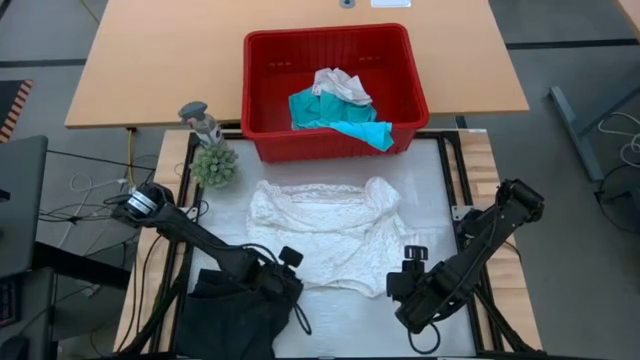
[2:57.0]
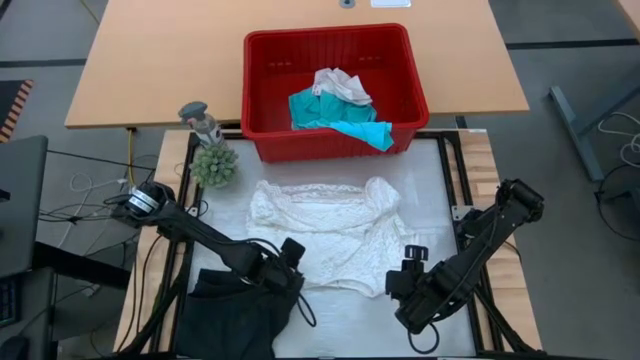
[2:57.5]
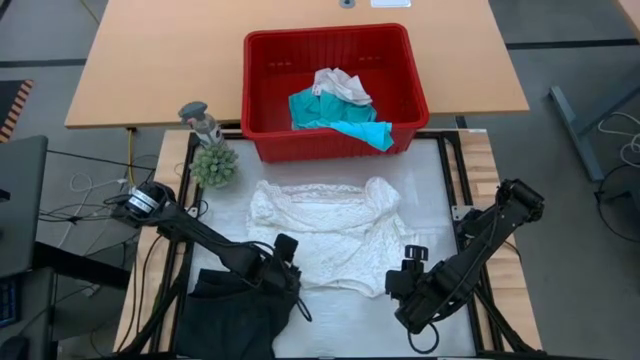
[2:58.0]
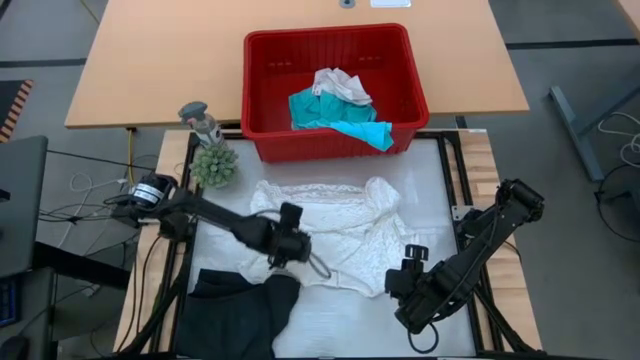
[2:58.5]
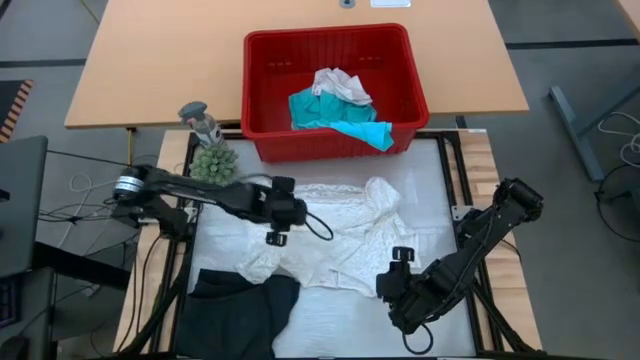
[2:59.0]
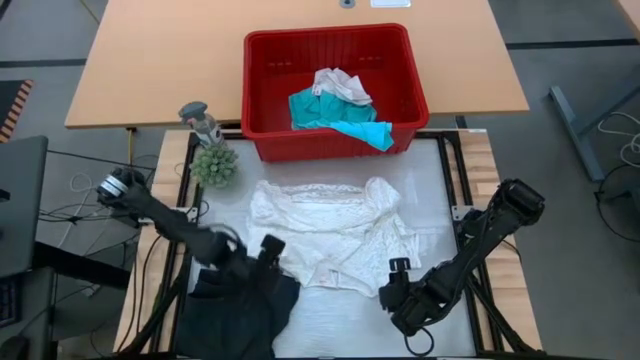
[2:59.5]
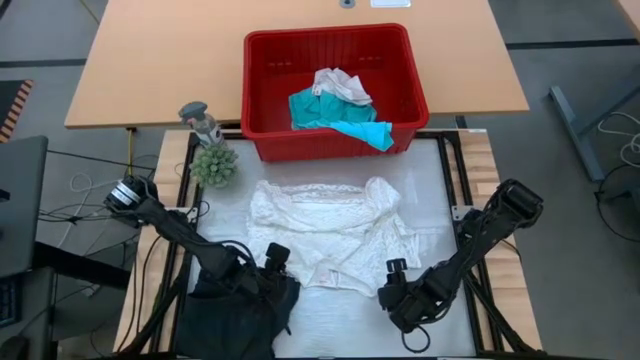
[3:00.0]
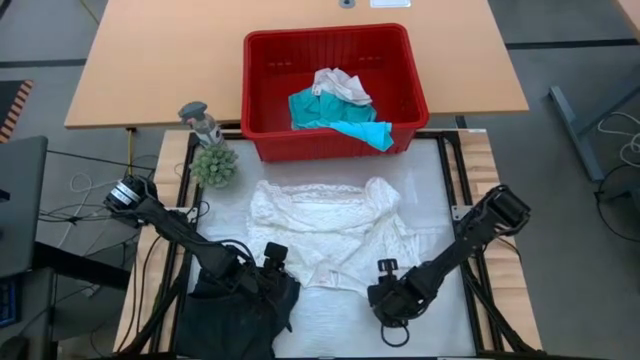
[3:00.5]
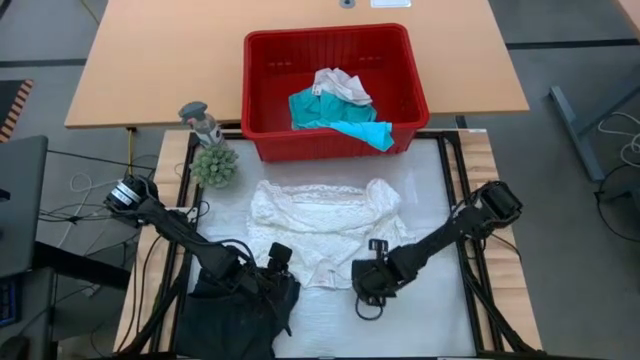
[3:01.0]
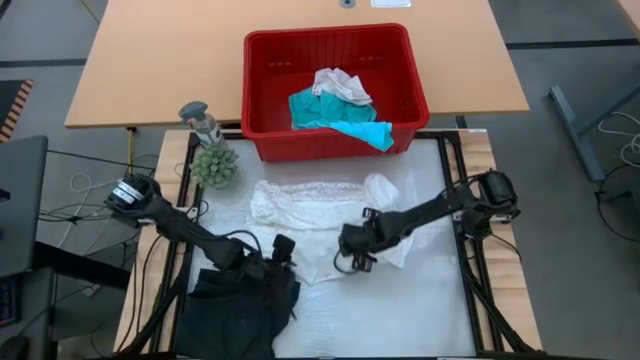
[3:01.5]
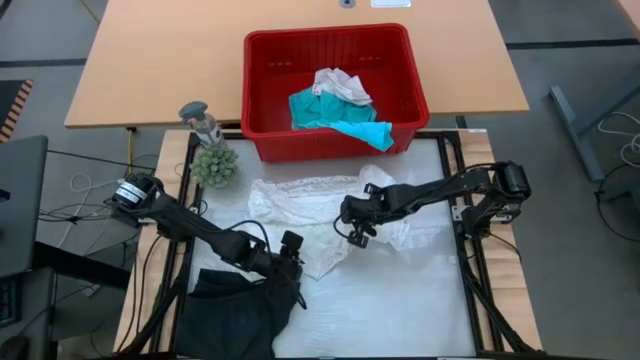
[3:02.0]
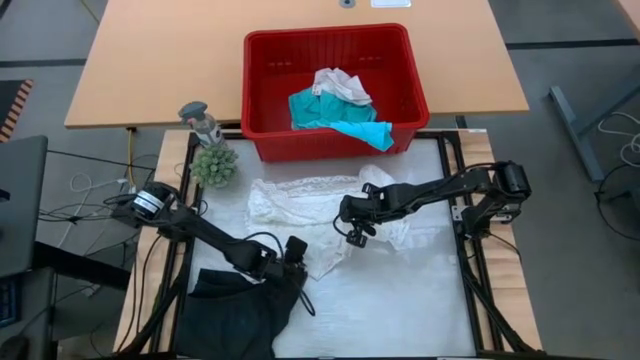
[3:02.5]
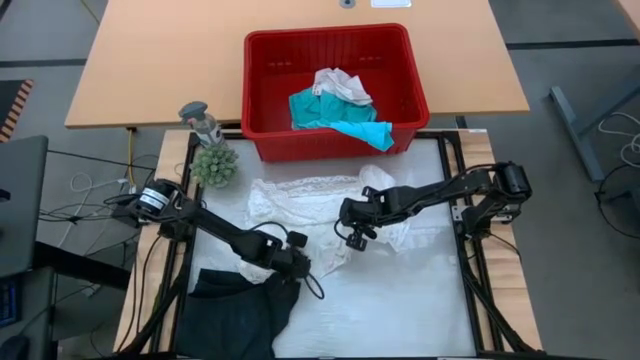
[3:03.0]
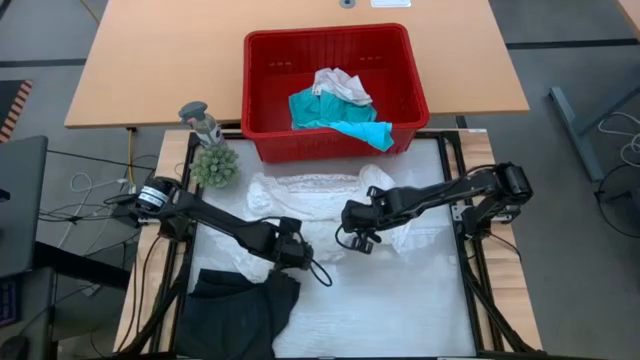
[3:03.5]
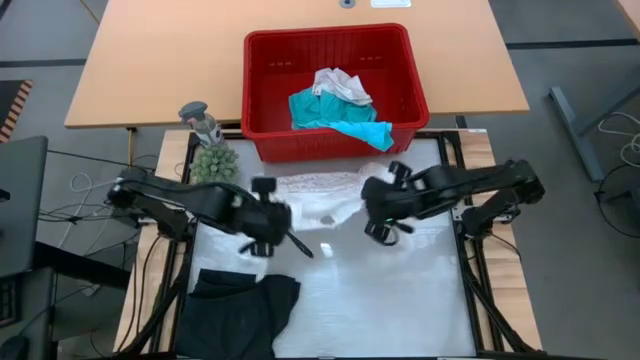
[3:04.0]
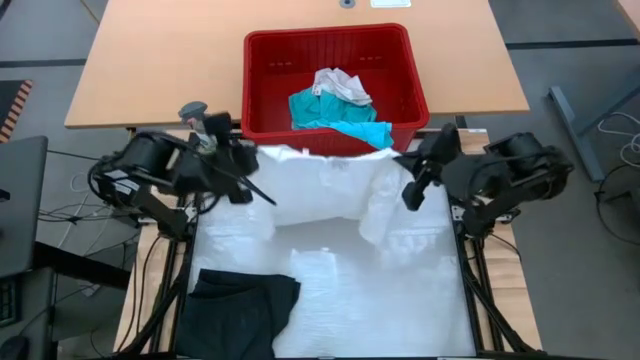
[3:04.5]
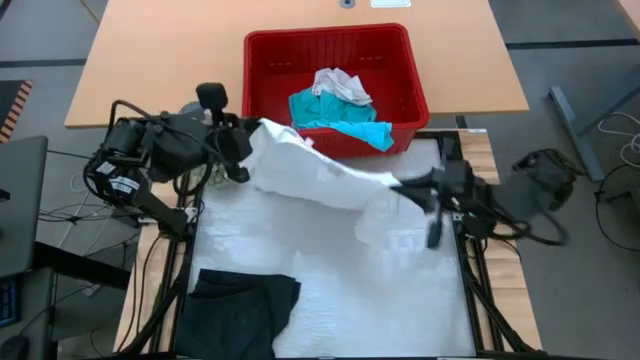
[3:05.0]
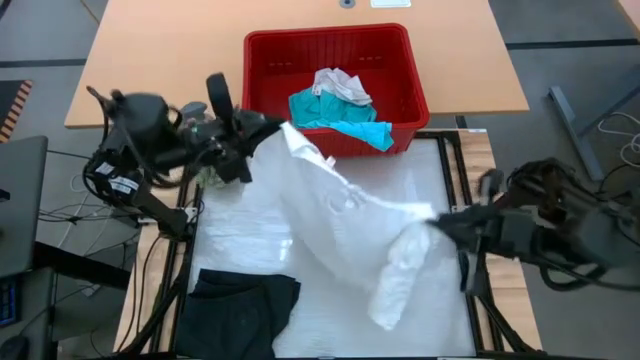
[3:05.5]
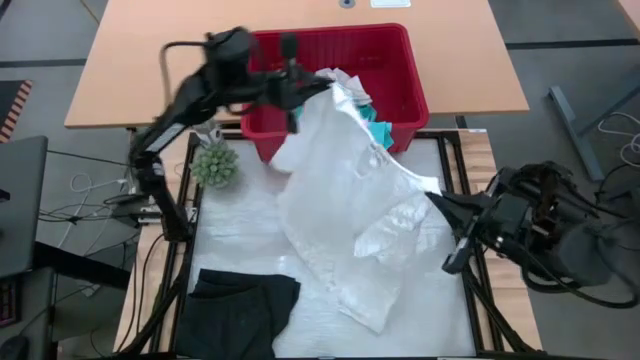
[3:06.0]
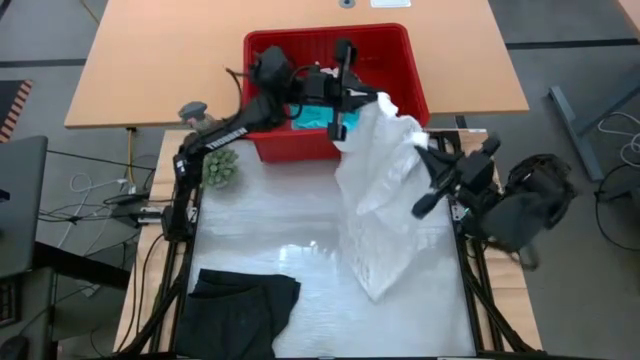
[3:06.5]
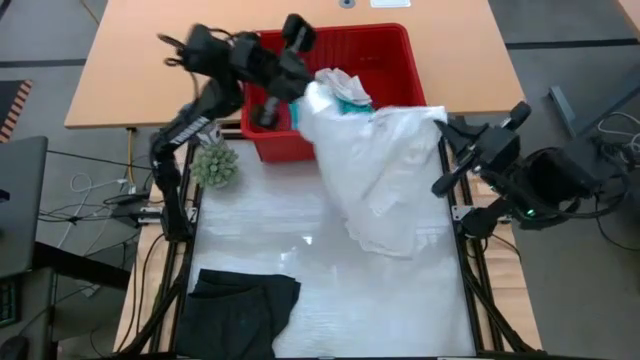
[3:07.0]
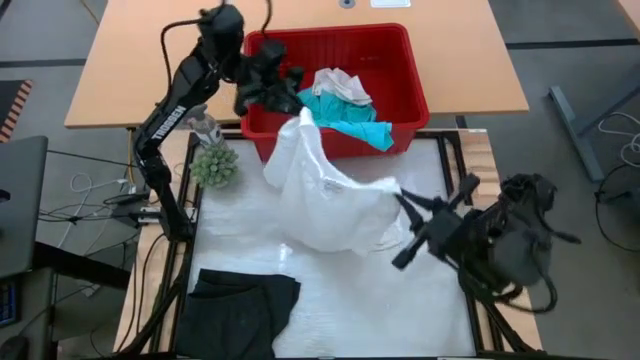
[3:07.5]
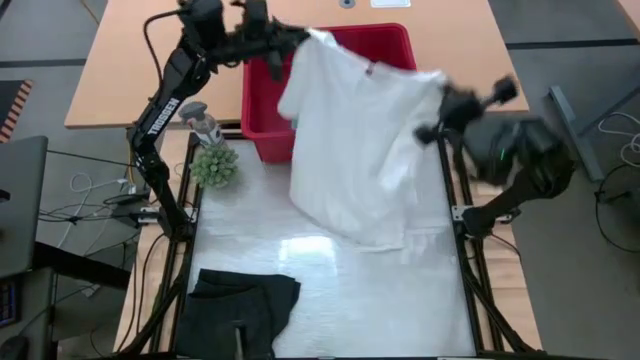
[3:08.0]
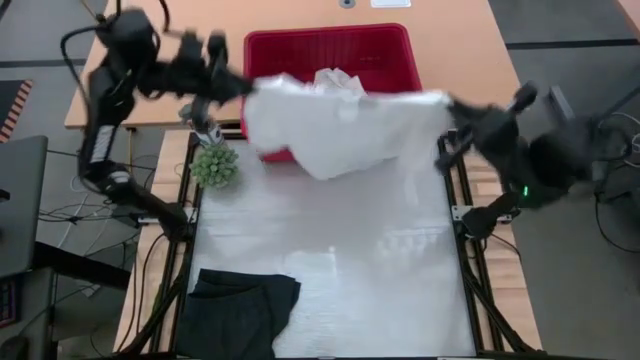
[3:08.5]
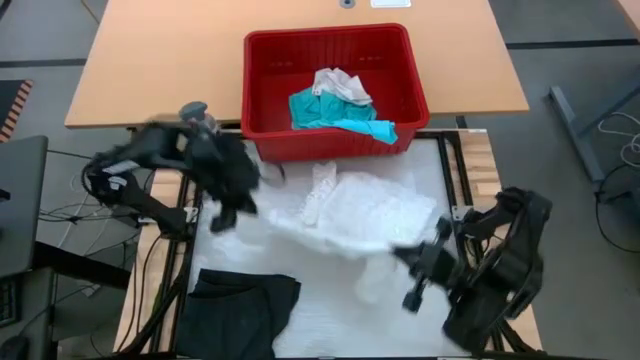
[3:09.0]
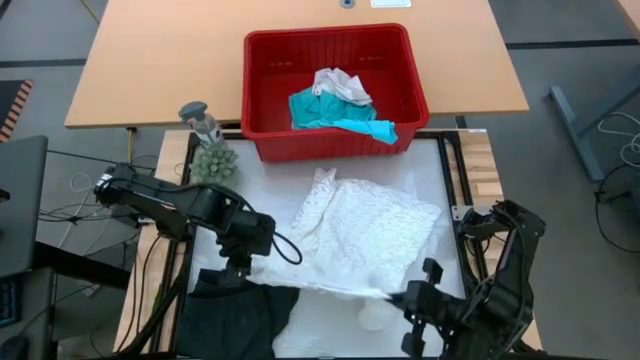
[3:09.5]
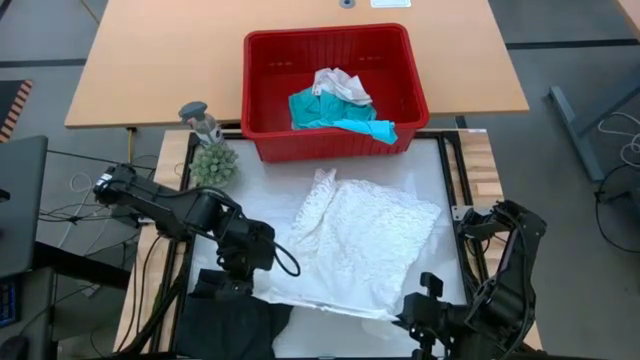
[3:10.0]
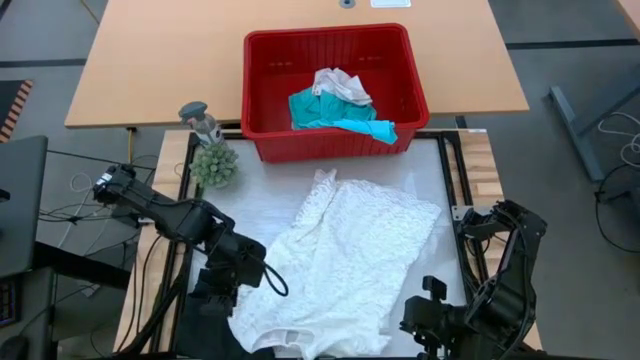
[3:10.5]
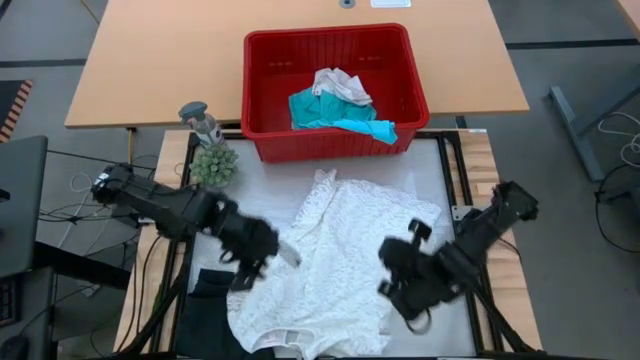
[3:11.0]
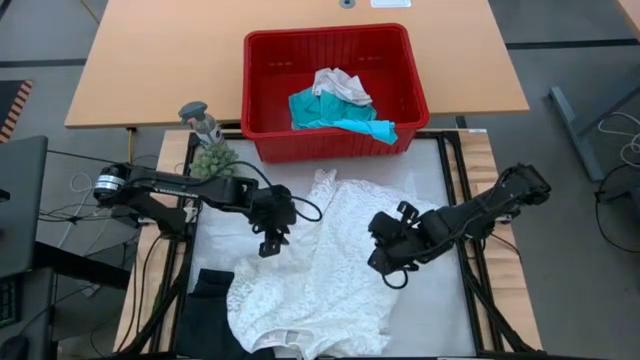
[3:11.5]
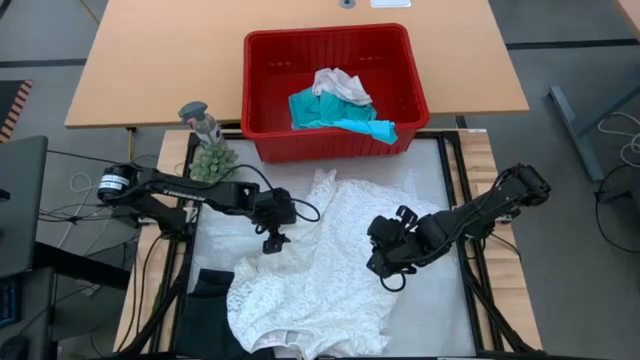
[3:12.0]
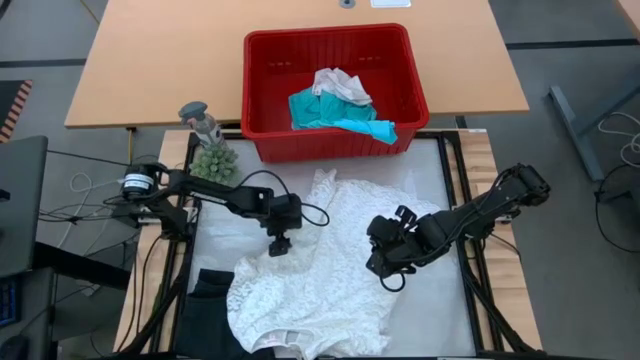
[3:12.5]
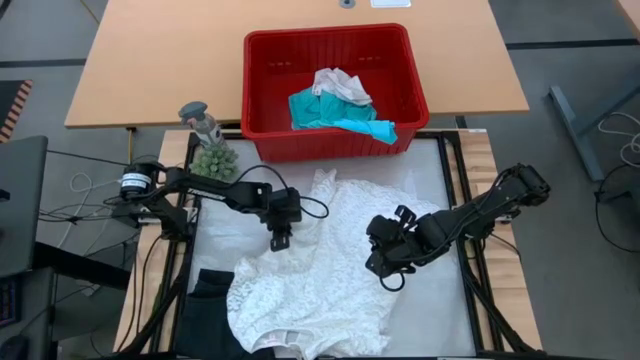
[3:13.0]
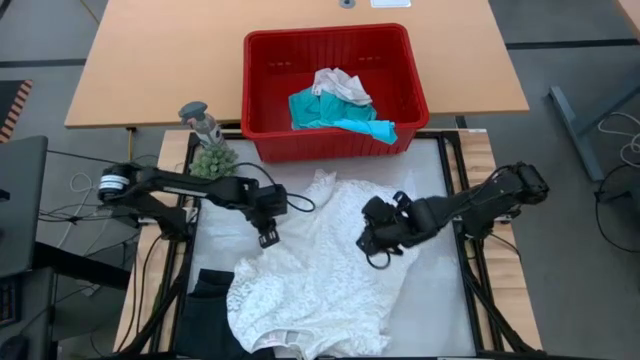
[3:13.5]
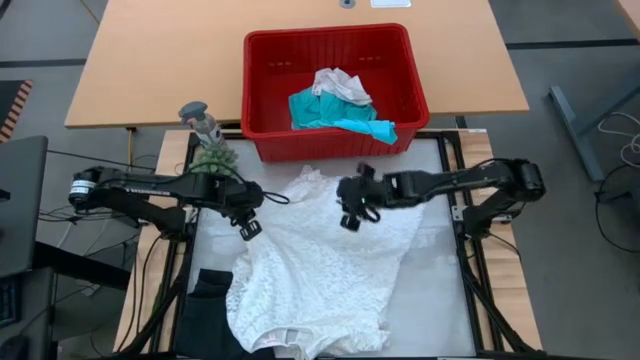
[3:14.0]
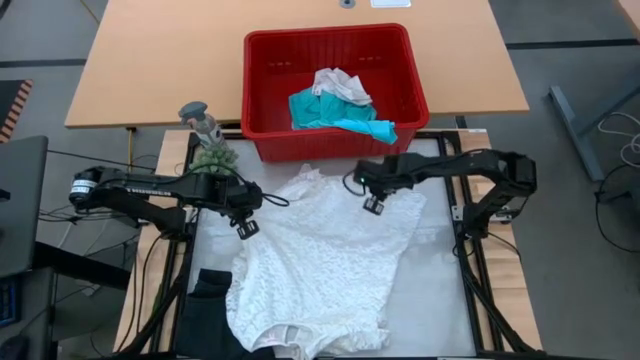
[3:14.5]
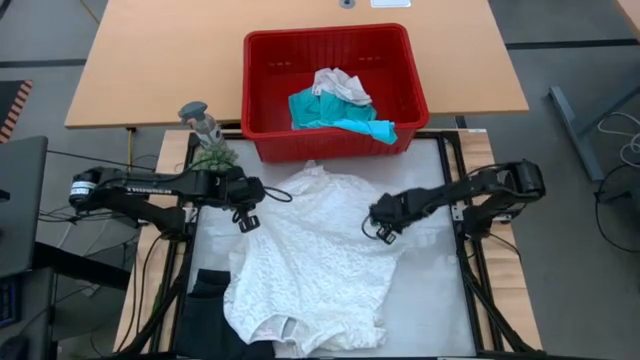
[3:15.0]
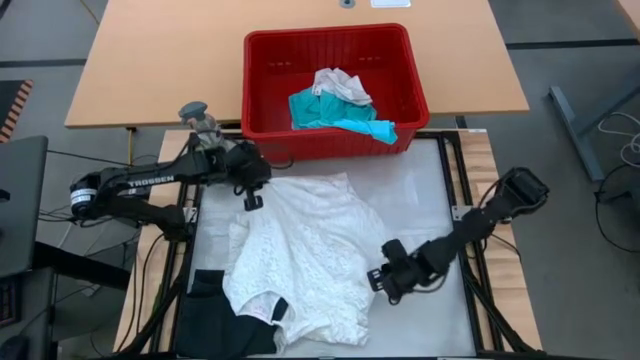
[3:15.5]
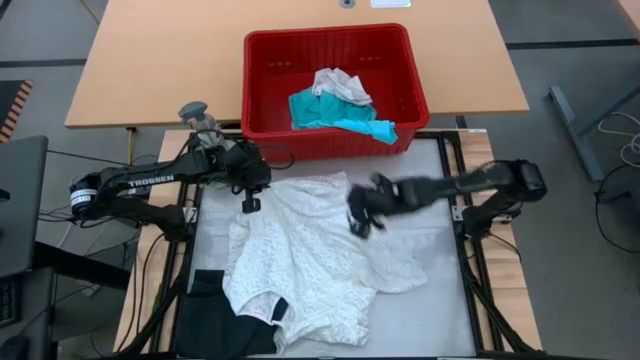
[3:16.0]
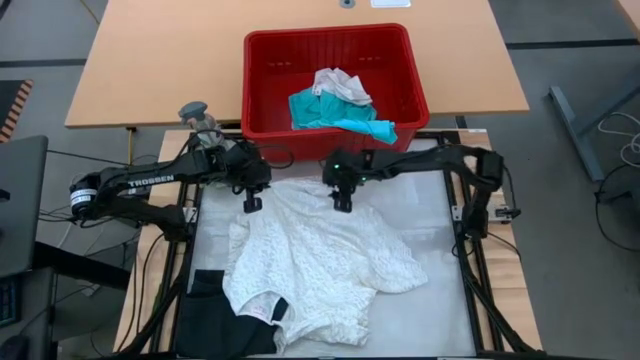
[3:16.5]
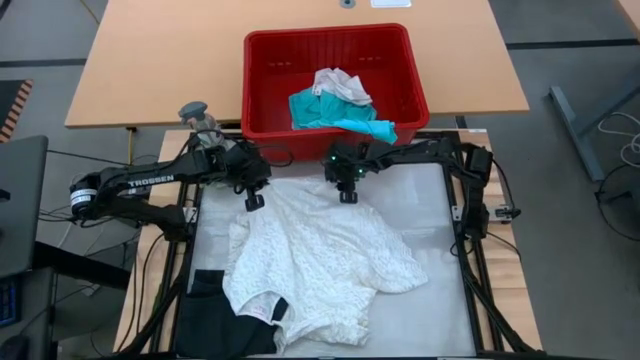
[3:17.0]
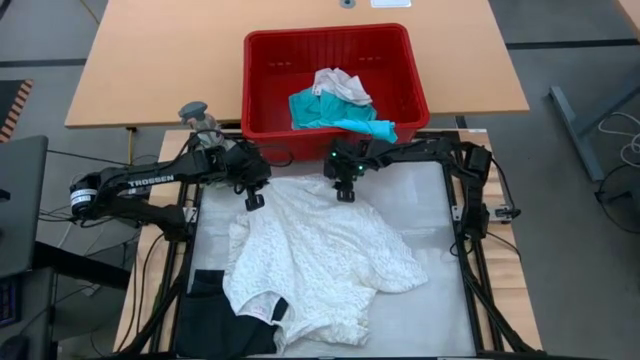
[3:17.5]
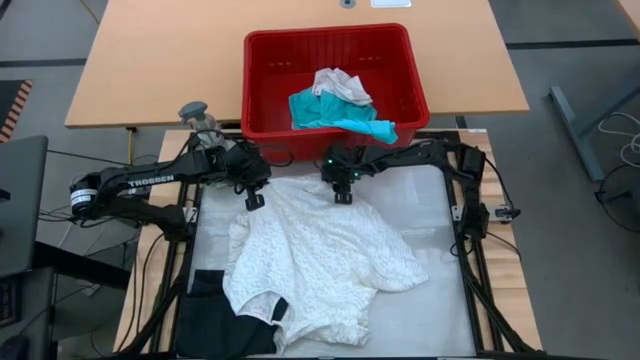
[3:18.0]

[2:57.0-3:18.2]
Task: Fold Laundry from Bin
Fold the white dress
